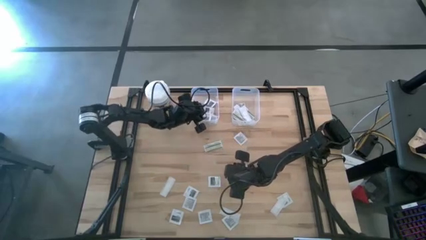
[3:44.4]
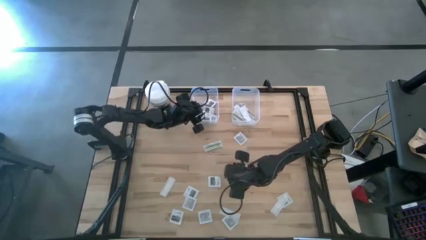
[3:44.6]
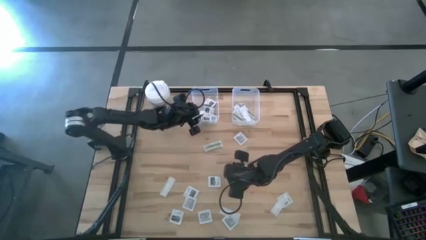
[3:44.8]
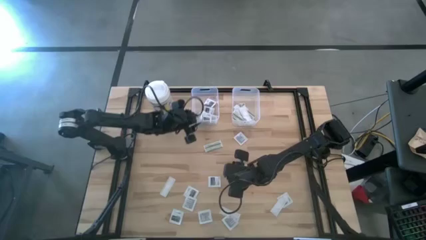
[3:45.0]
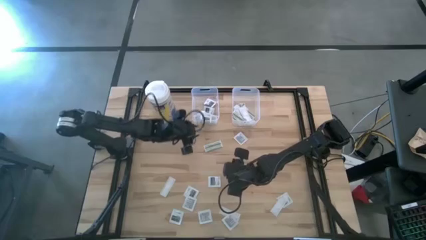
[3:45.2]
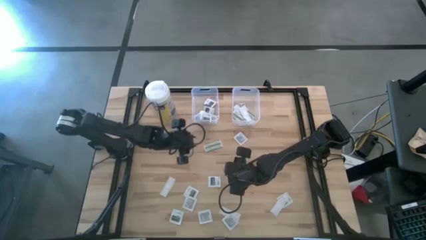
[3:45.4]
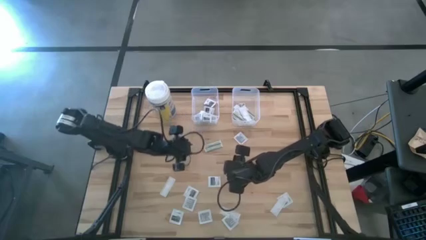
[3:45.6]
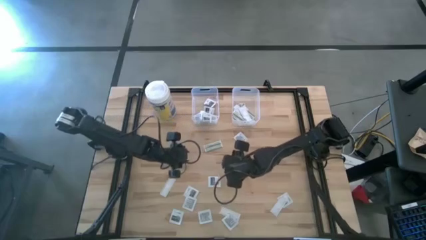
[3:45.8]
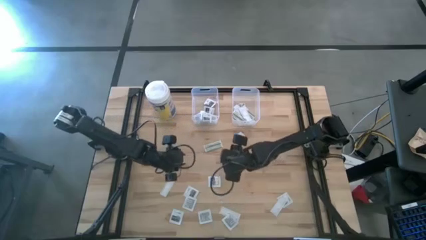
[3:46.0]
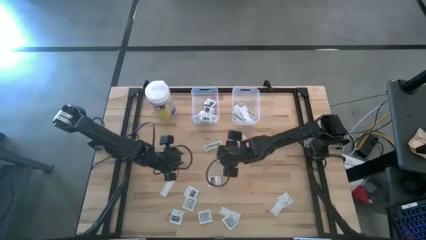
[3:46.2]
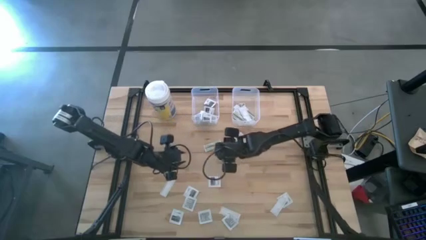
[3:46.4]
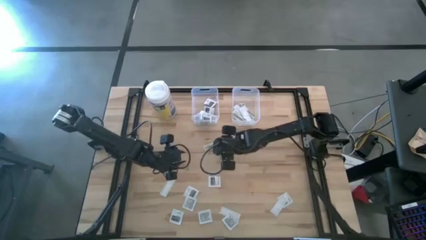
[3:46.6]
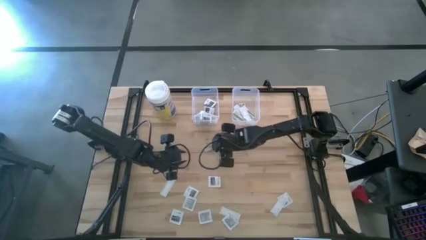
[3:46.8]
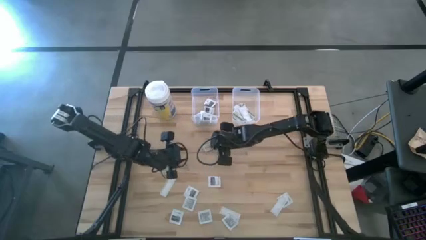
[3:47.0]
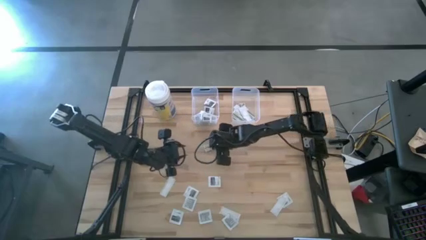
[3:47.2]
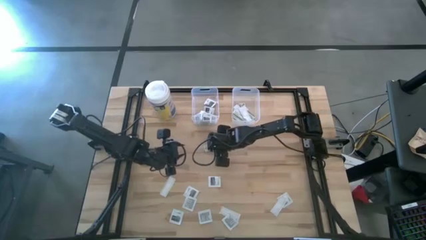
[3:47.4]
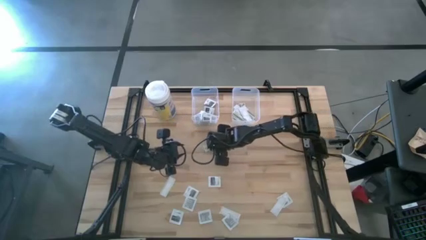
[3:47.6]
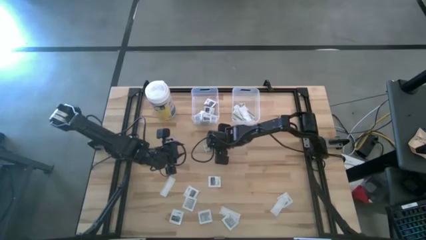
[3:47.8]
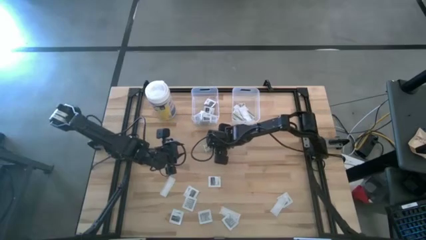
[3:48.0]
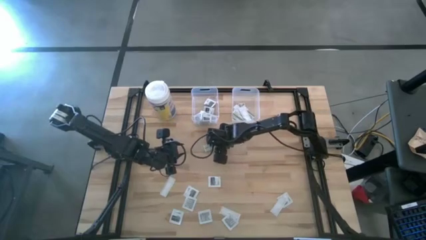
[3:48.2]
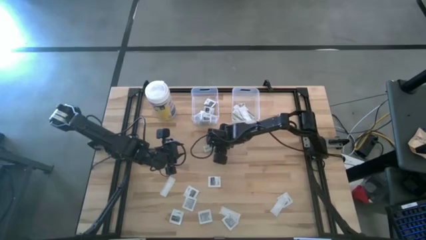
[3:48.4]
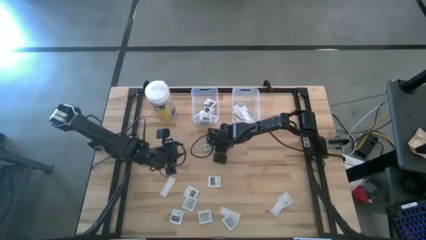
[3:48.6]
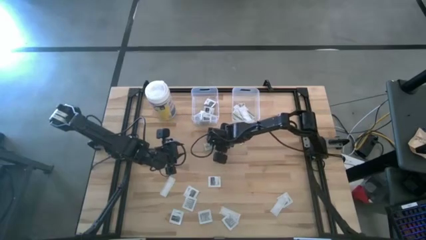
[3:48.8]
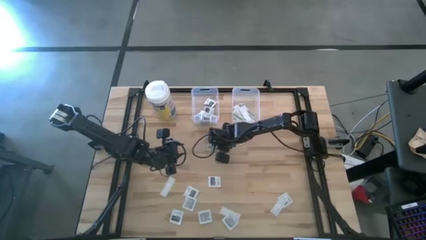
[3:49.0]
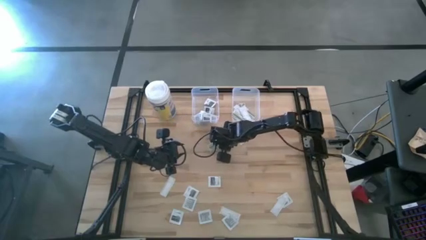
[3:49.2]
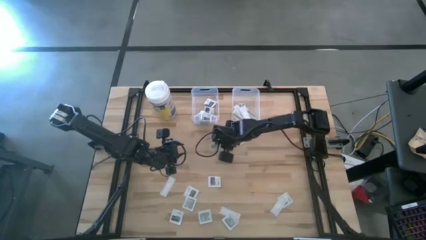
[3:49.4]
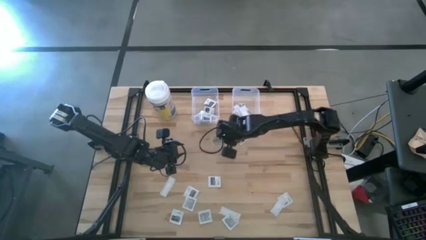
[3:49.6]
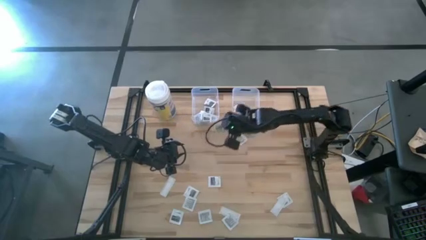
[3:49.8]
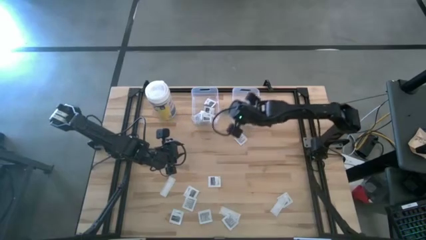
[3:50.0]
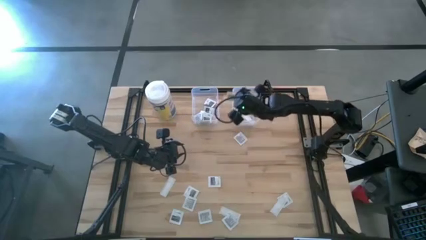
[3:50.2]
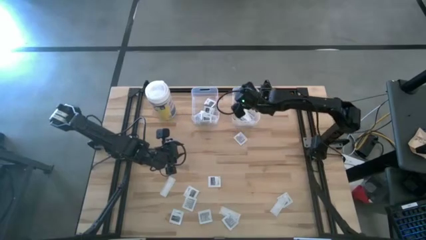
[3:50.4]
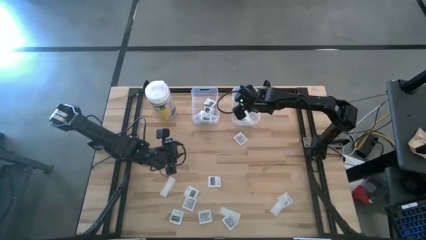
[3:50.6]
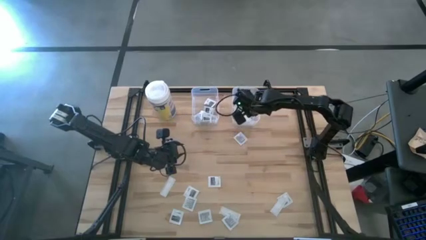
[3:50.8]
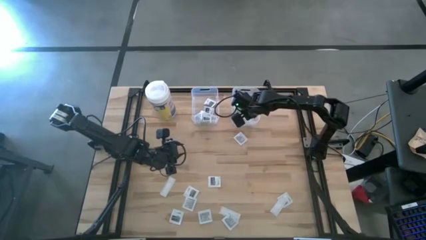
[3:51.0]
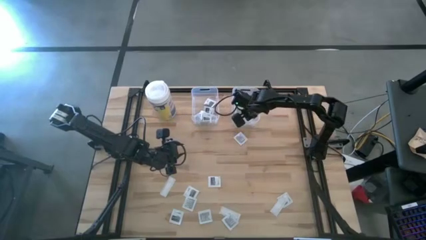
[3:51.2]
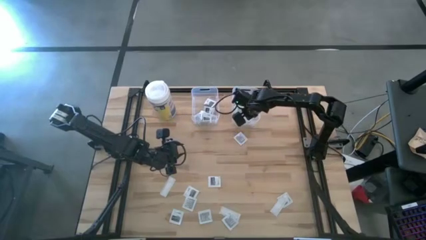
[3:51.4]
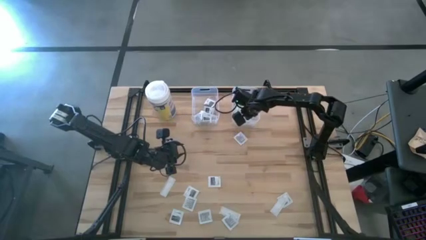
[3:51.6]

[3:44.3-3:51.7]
Task: Pick & Place First Aid Supplies
Put the bandage into the right transparent bin

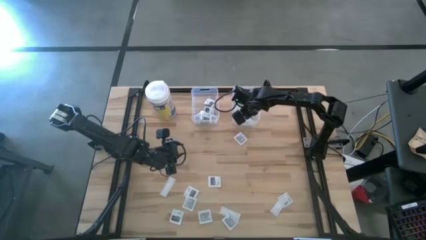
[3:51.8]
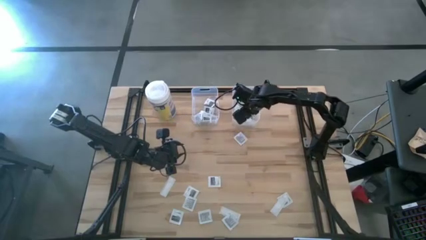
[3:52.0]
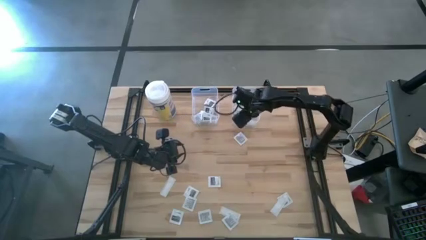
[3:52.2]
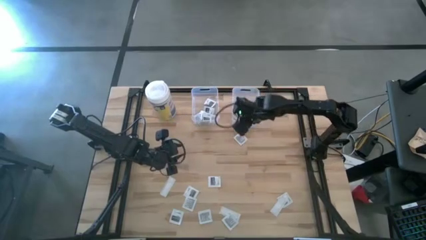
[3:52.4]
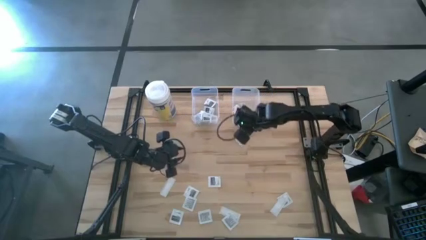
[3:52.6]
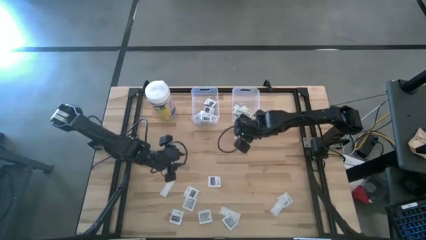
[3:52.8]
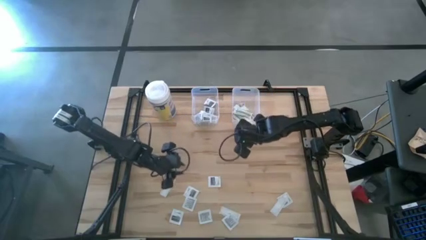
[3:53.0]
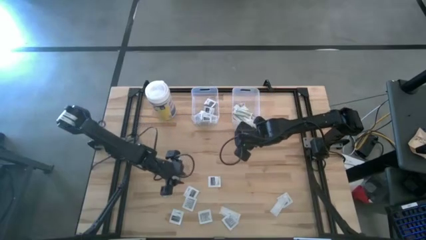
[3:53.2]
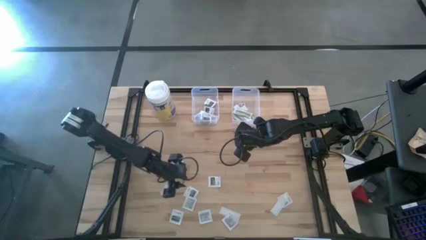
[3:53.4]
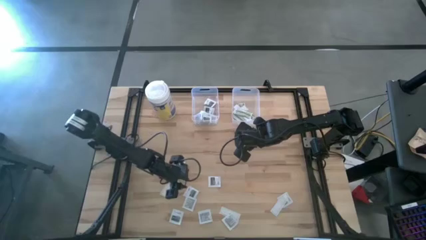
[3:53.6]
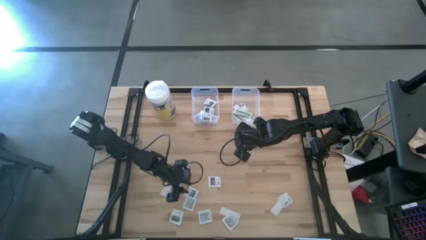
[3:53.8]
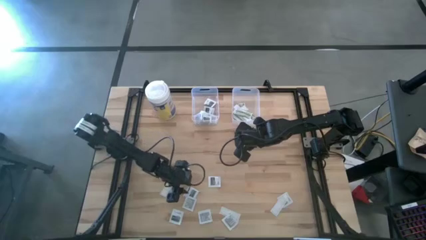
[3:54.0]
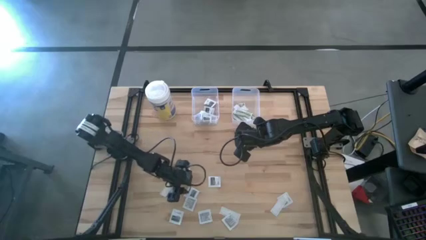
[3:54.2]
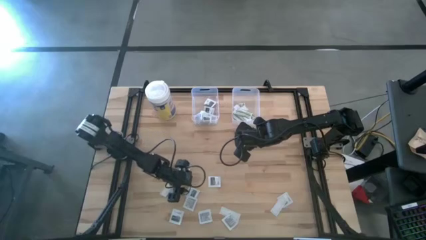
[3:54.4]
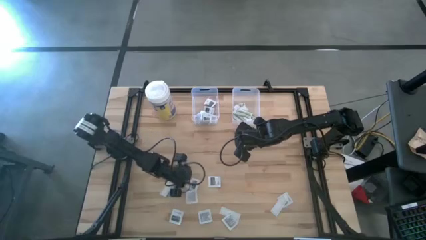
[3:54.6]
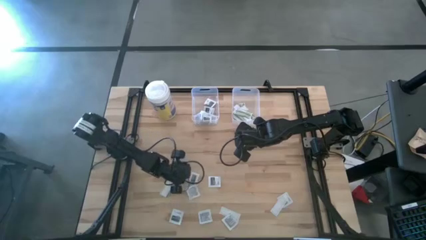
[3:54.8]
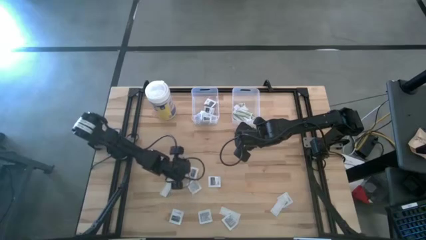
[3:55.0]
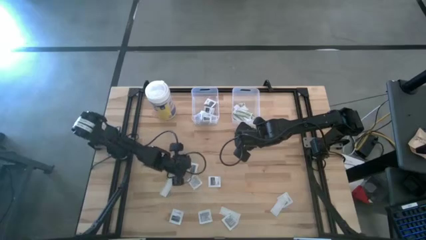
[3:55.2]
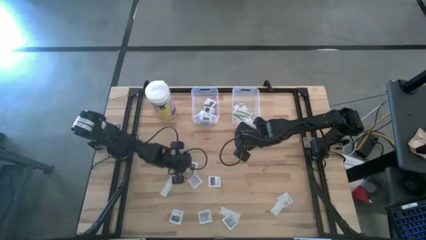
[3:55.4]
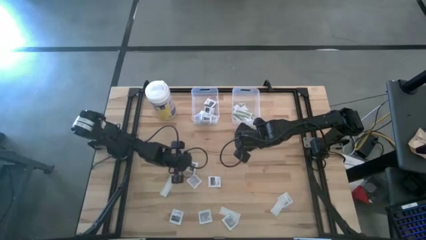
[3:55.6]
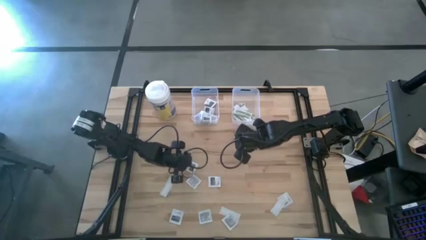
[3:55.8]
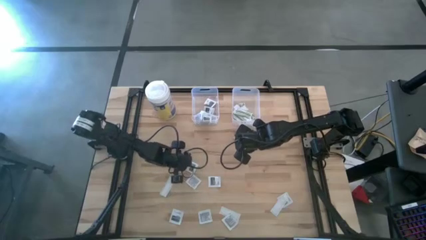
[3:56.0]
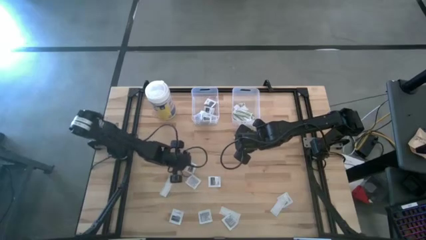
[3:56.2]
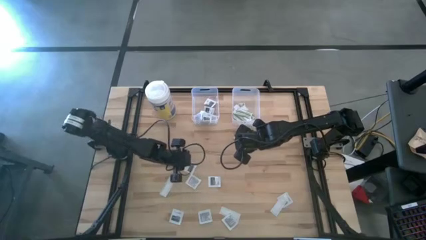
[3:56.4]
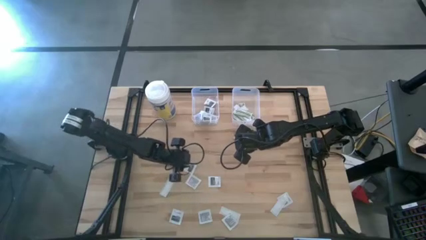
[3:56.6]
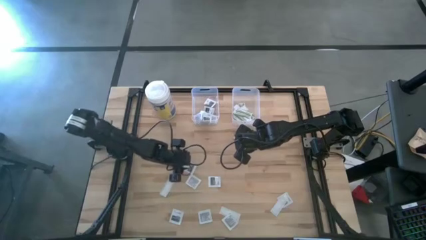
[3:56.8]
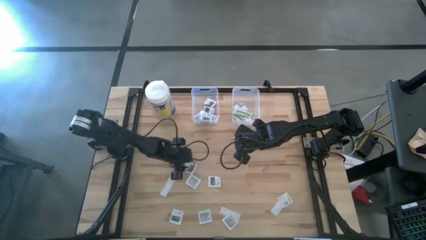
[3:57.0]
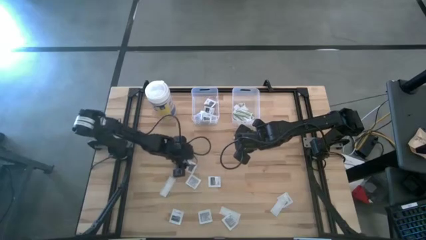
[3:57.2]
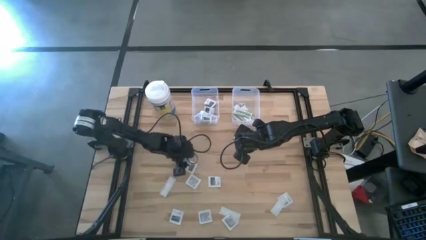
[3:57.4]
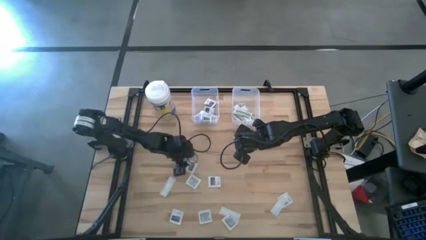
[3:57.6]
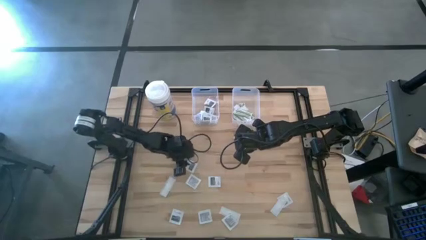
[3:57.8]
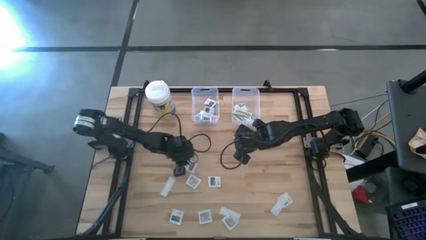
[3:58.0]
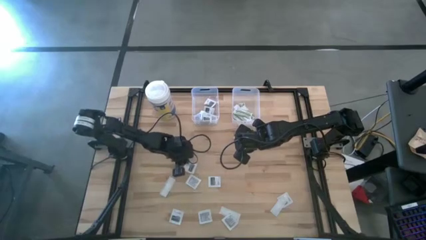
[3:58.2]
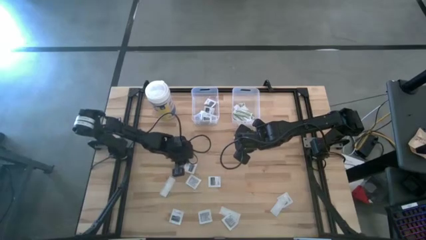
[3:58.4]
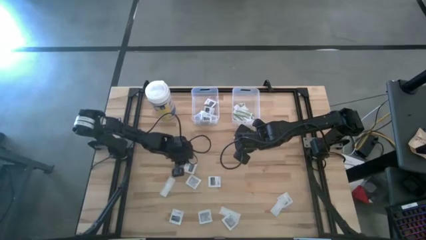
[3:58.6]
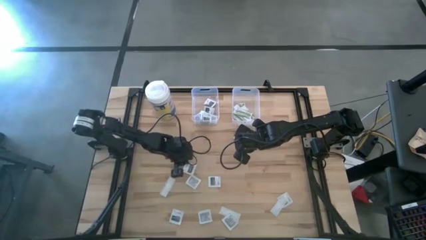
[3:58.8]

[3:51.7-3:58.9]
Put the towelette pack into the left transparent bin

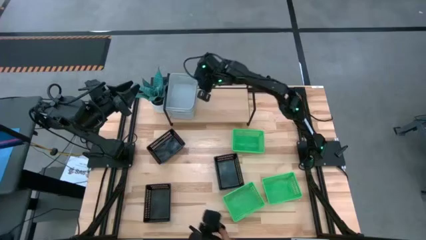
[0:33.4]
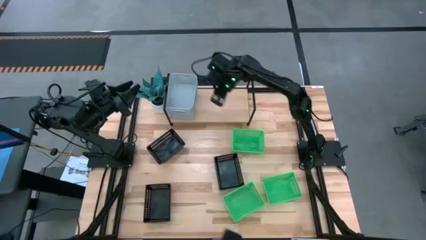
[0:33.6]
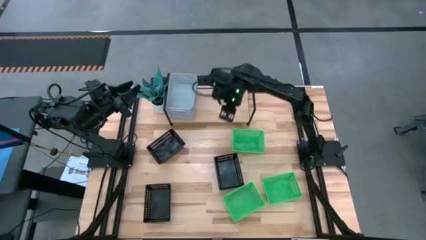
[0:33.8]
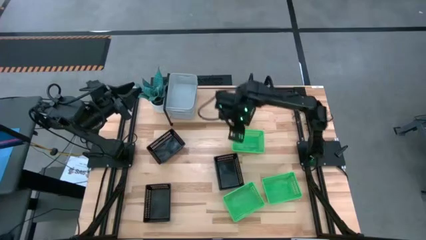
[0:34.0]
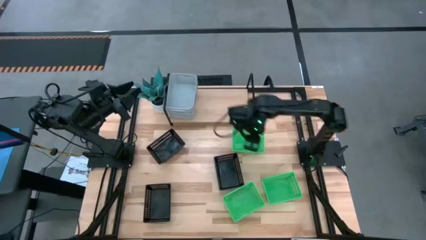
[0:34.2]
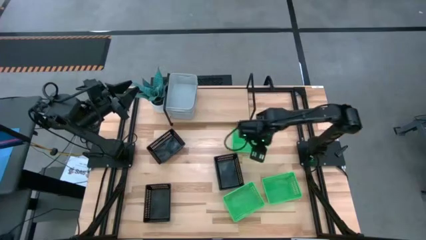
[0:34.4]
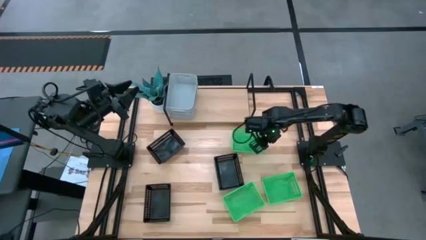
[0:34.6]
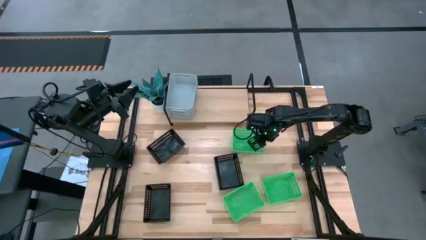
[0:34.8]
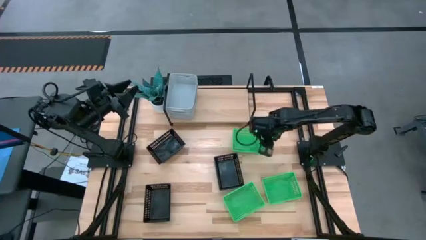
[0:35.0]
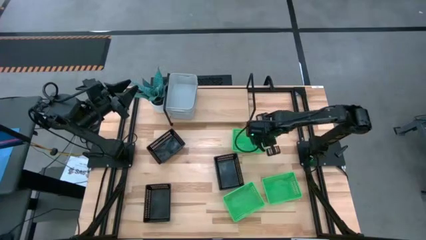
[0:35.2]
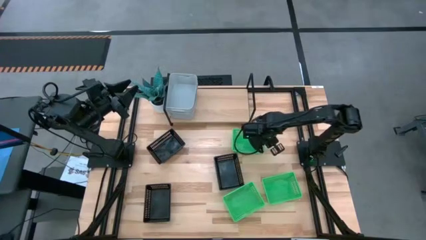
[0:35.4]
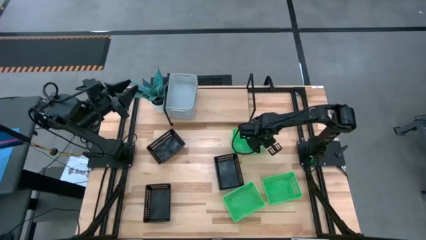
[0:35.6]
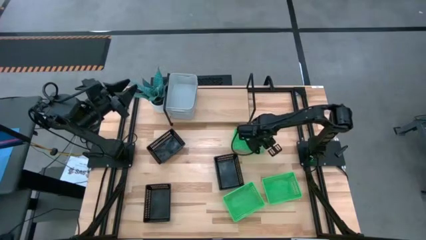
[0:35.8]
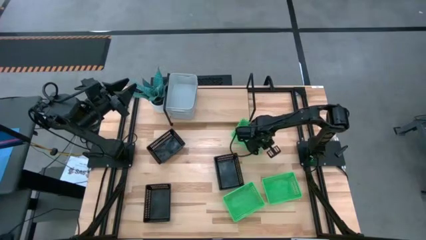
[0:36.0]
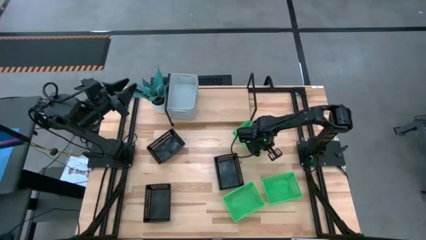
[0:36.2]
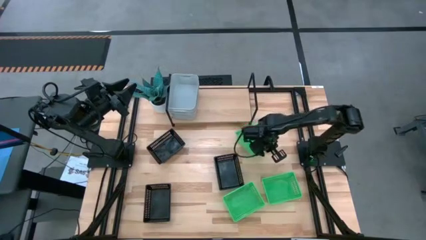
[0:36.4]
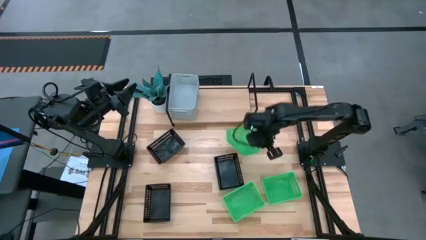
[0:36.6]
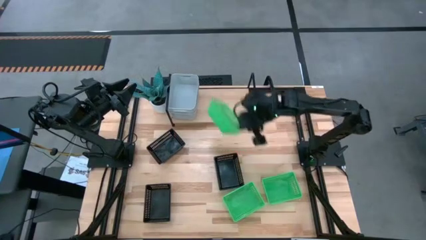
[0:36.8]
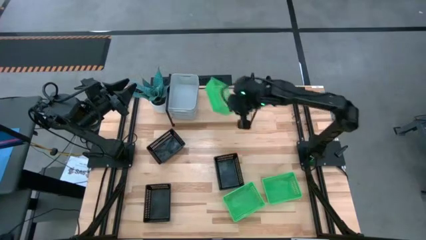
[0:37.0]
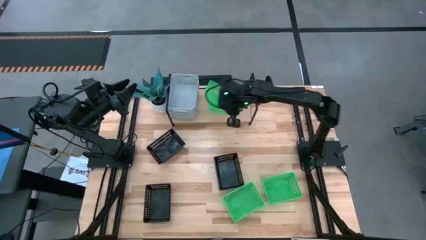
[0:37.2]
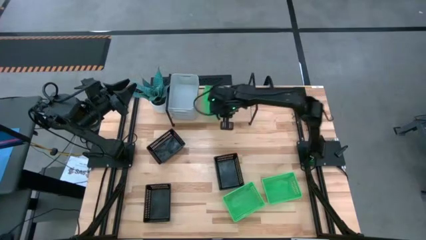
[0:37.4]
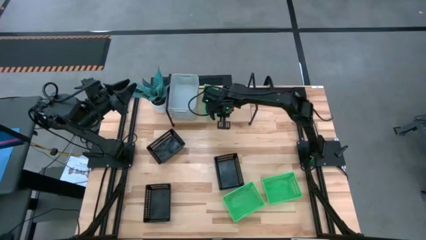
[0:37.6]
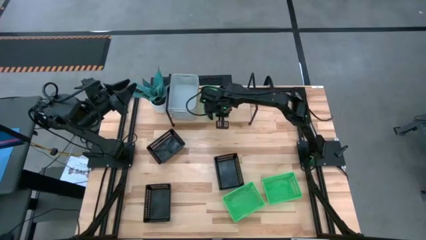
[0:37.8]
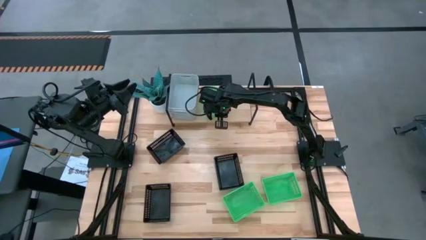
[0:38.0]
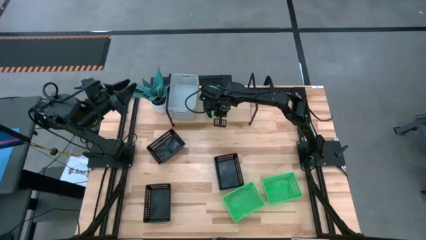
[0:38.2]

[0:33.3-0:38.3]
Task: Stack baskets on shelf by color
Put the top green bin on the shelf
